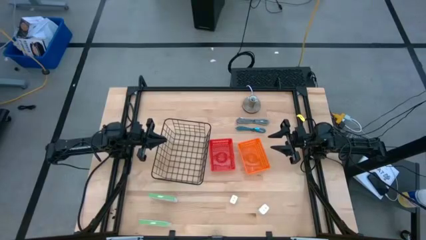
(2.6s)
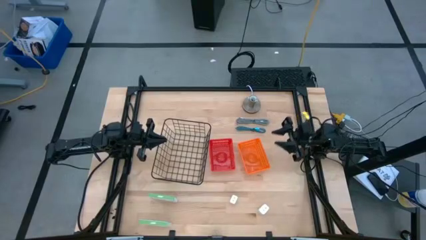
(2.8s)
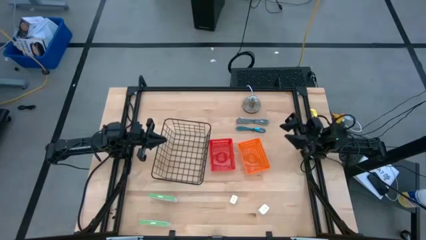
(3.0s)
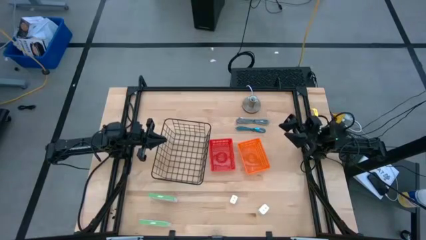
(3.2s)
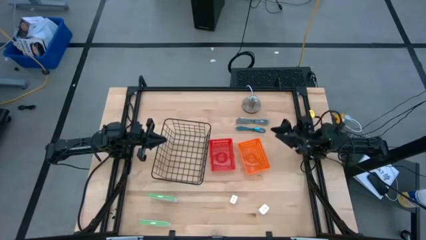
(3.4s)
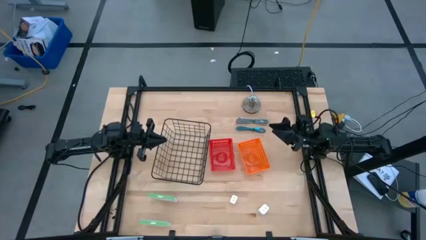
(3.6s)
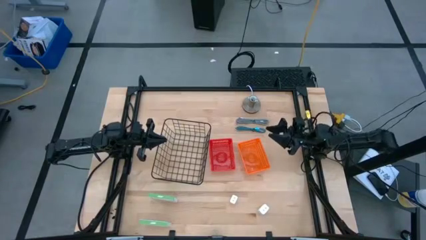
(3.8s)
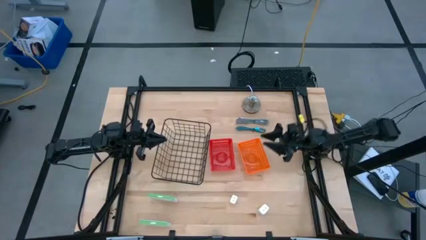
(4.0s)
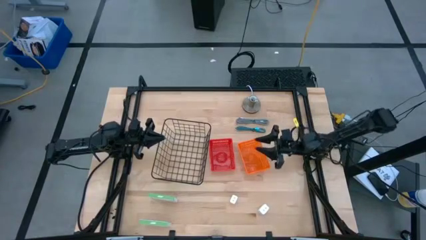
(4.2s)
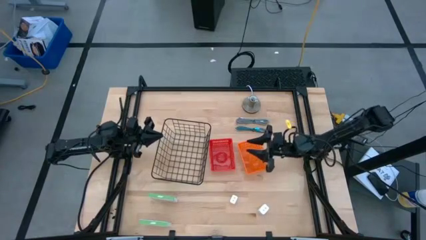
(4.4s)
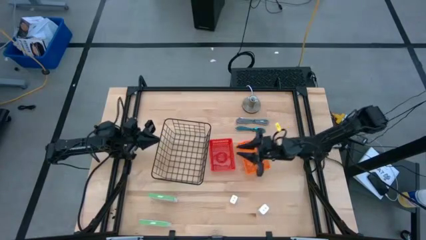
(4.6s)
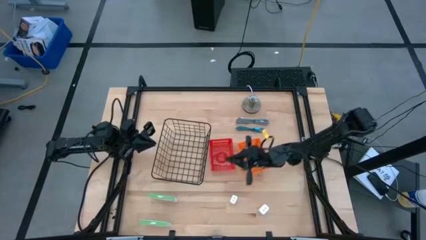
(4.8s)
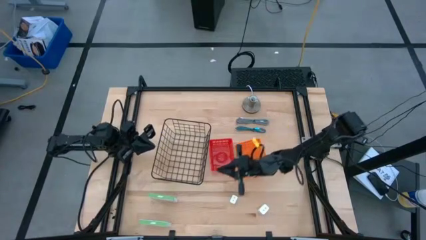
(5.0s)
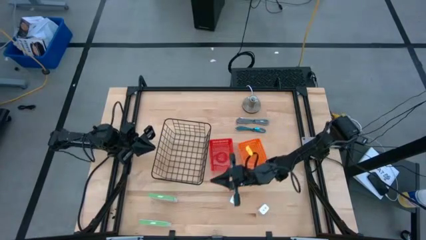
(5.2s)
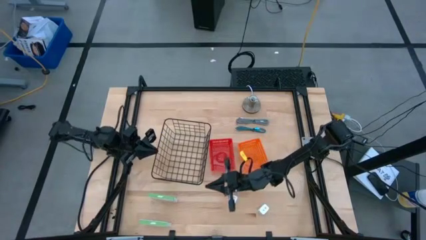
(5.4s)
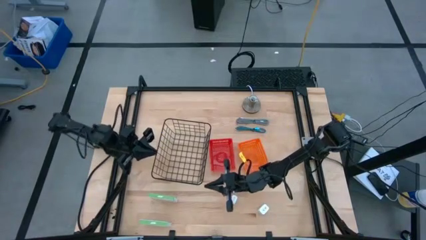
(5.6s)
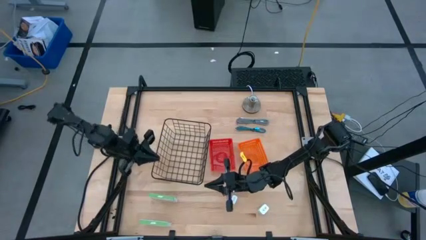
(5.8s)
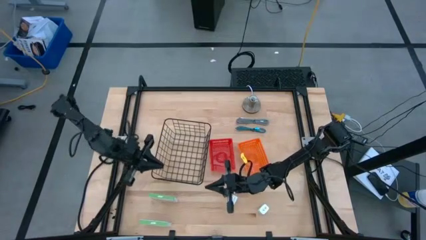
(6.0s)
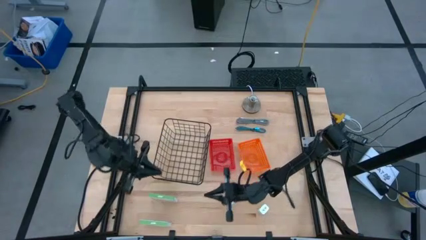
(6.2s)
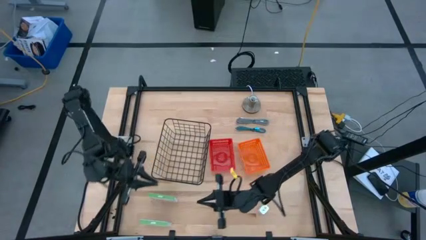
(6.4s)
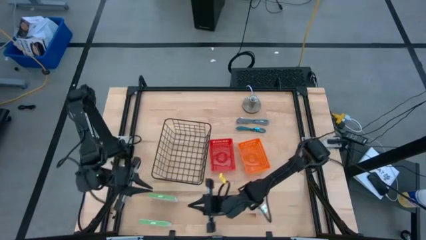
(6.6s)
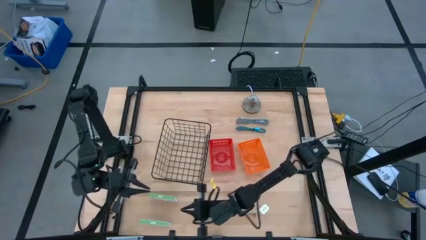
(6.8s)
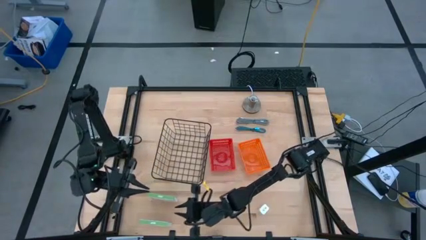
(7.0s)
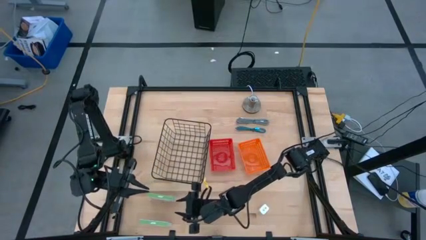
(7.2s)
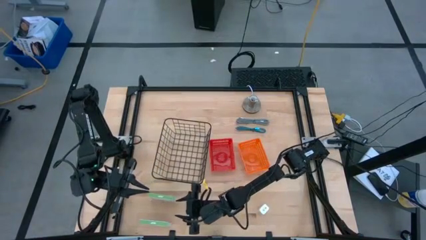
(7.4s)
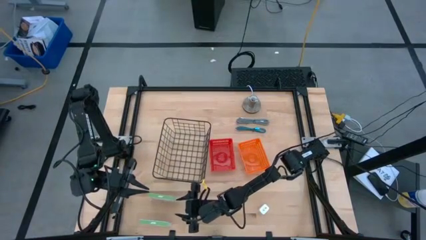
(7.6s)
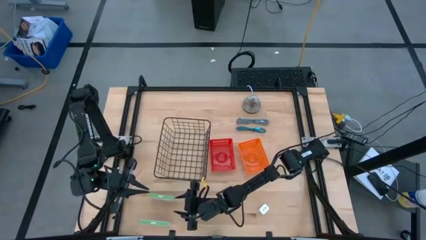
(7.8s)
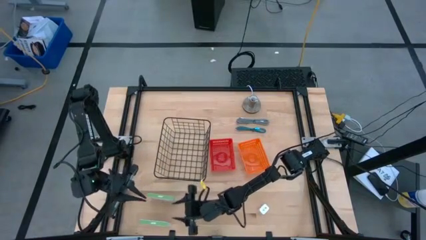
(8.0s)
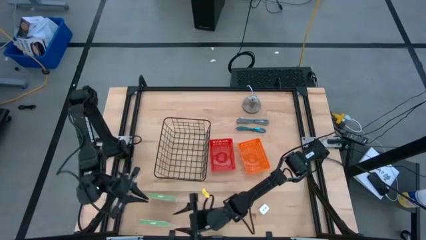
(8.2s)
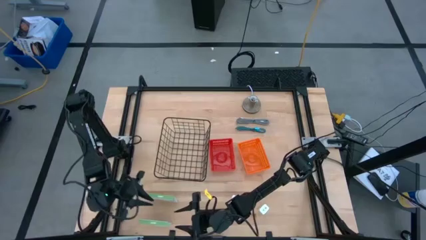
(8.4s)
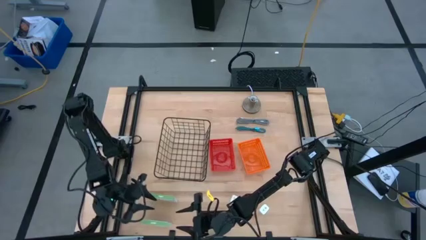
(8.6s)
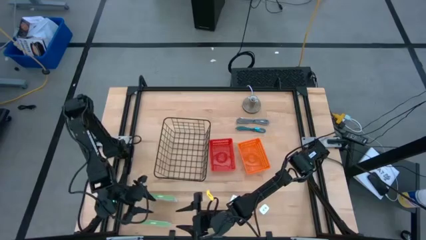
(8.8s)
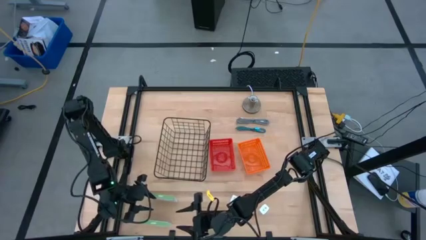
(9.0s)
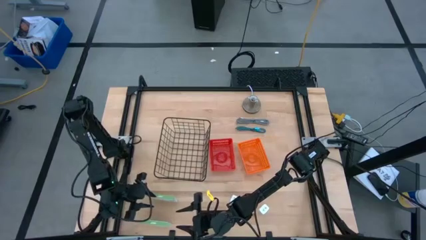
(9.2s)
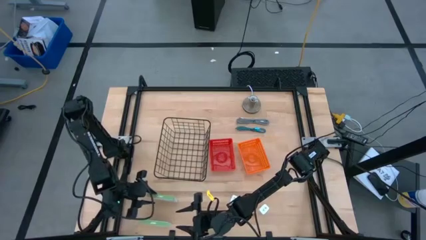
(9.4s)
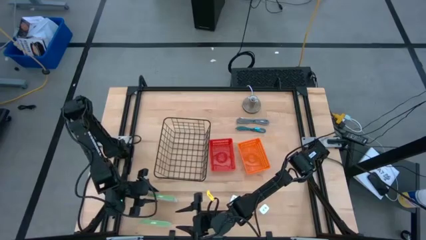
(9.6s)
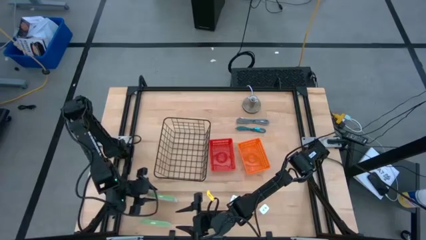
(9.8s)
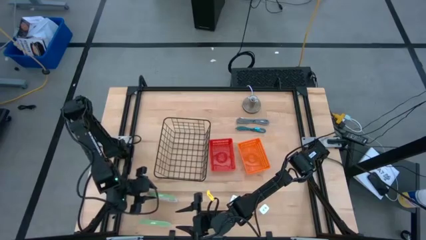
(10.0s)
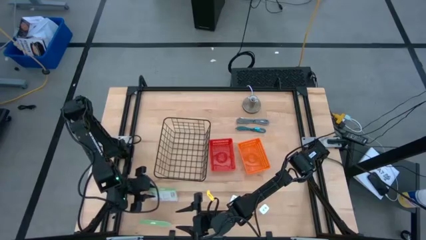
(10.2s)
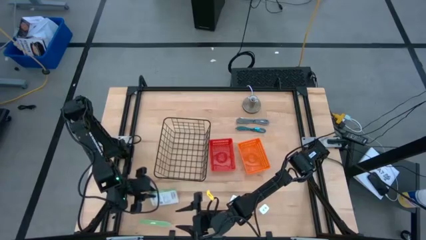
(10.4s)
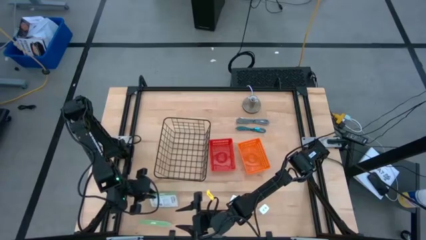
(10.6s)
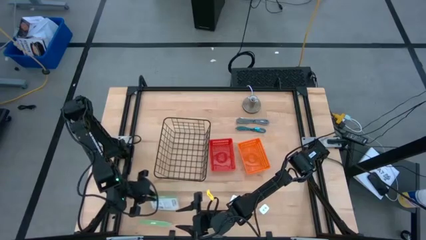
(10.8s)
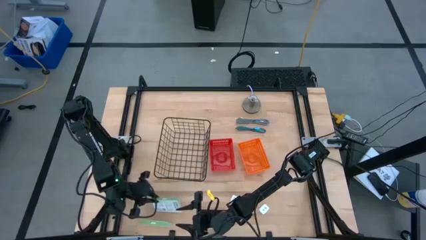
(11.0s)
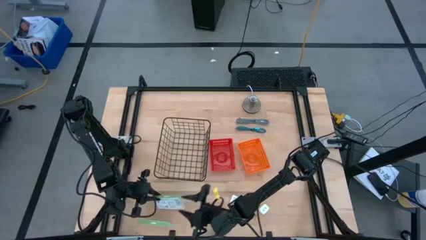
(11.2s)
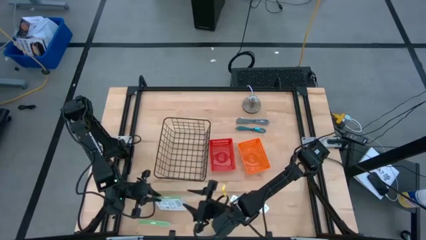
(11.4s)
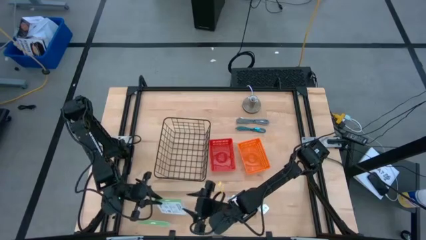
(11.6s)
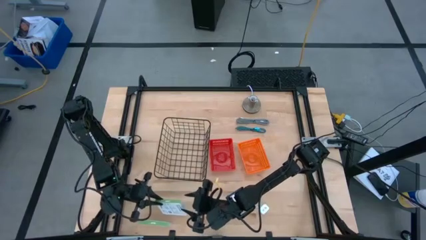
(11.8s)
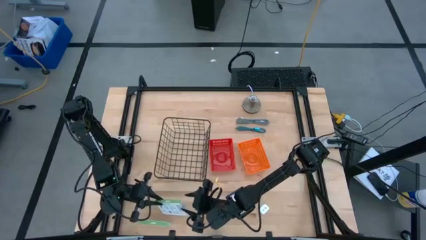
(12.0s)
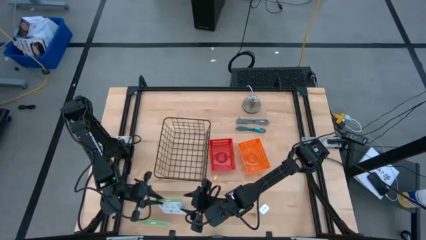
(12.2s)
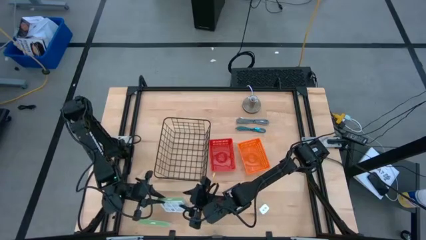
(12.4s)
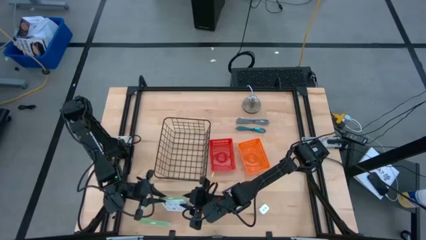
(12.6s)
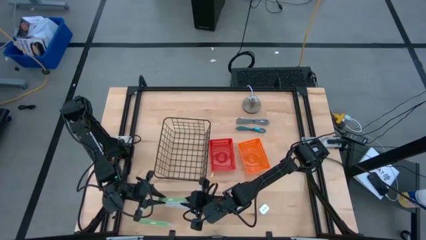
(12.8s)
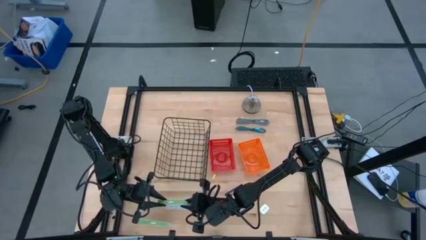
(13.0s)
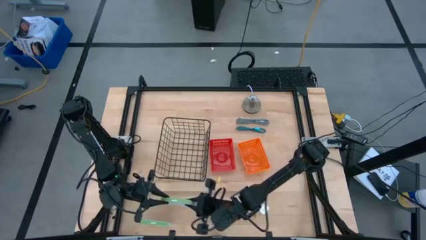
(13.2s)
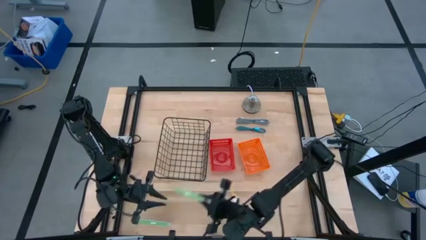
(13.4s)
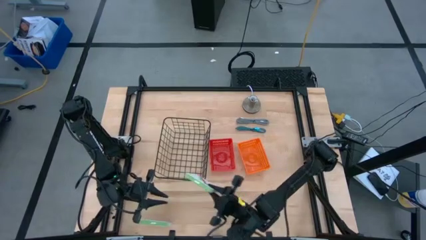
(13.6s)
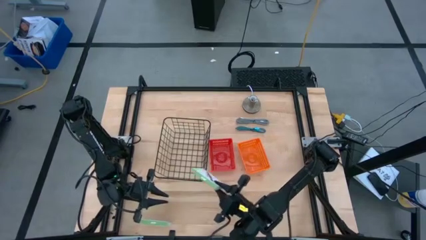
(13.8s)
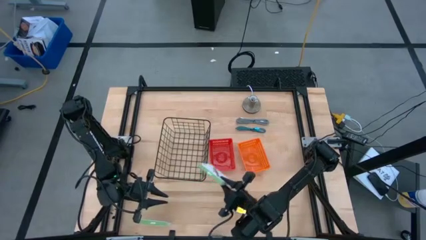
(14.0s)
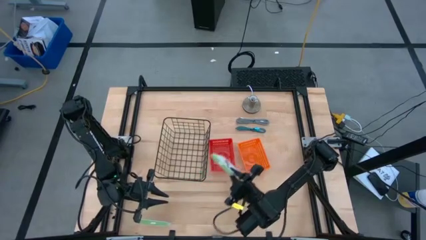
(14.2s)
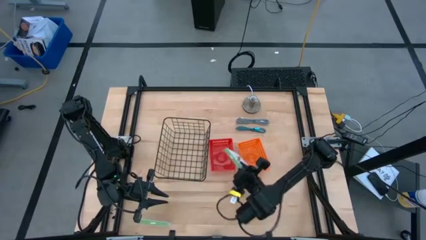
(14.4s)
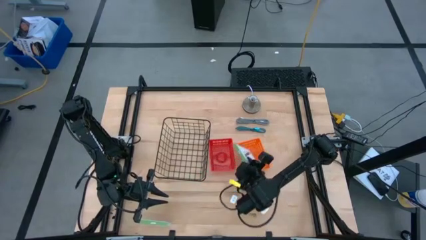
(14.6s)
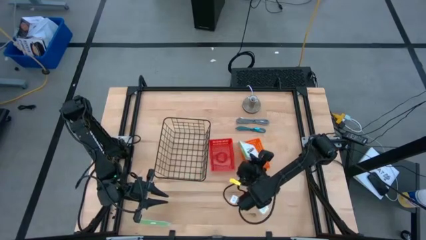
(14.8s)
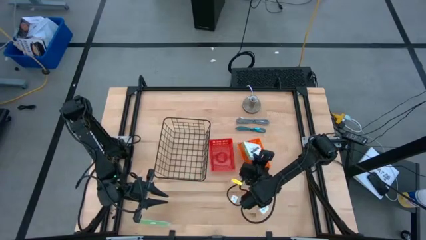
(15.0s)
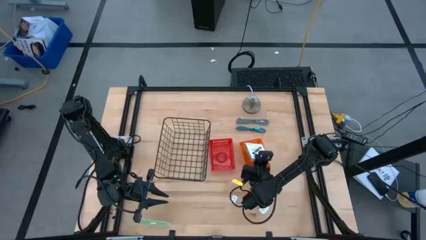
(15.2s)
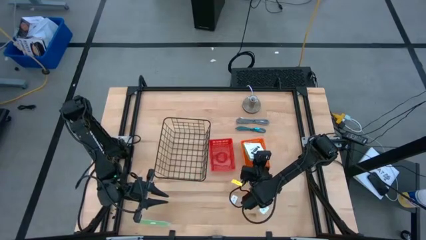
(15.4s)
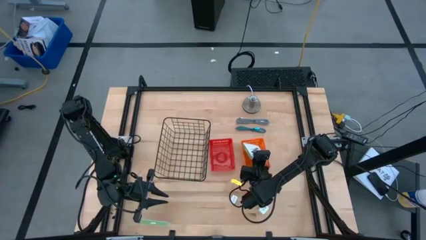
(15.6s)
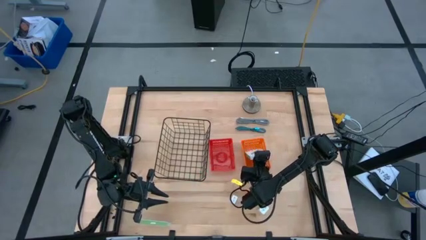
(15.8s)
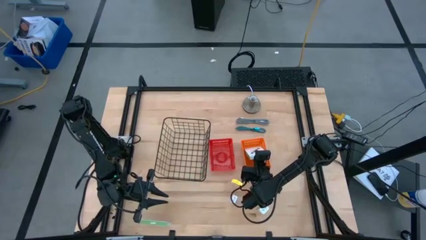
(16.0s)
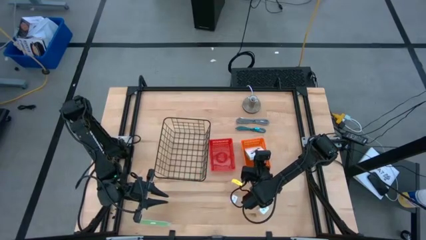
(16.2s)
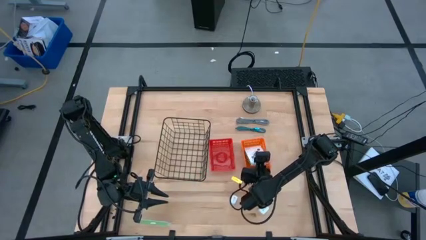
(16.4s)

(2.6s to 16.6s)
Task: Pick and place items into bin
Put the top card reader box into the orange basket
